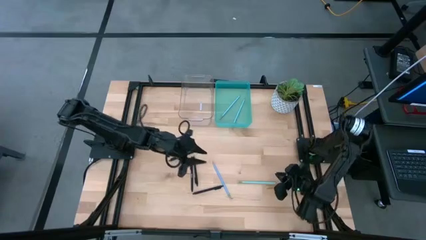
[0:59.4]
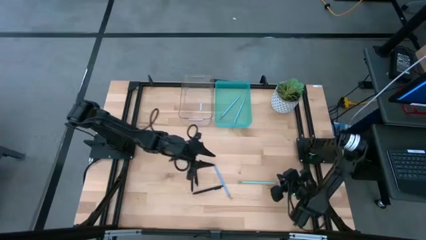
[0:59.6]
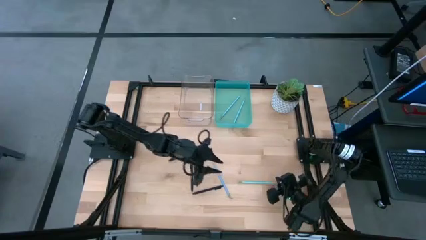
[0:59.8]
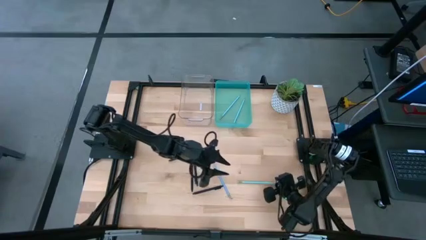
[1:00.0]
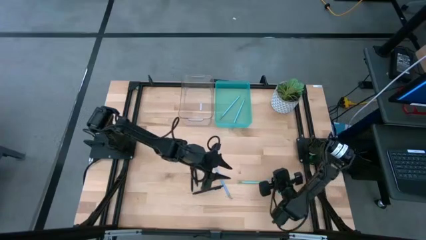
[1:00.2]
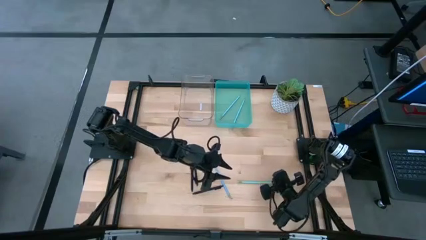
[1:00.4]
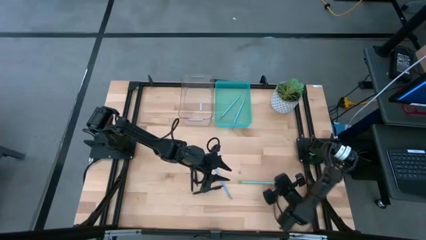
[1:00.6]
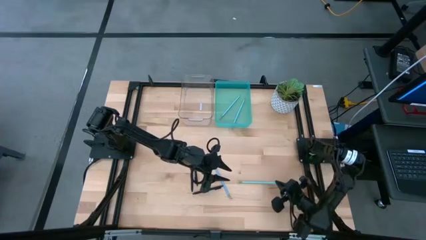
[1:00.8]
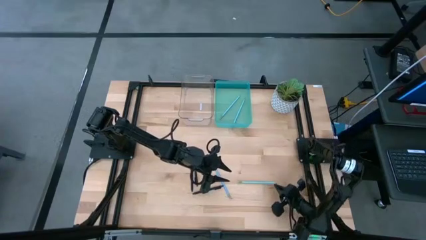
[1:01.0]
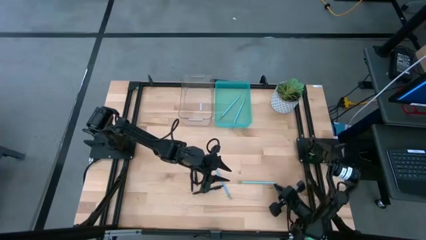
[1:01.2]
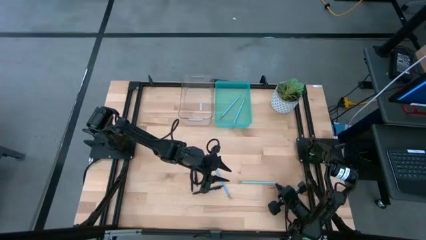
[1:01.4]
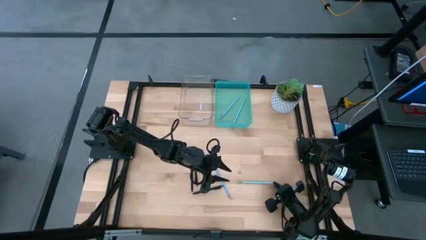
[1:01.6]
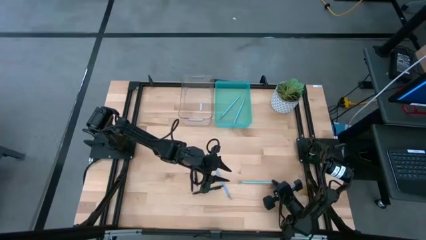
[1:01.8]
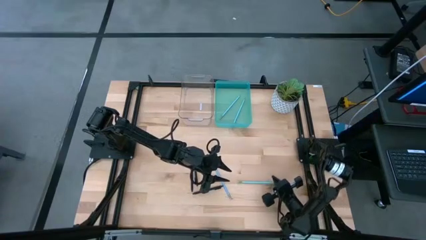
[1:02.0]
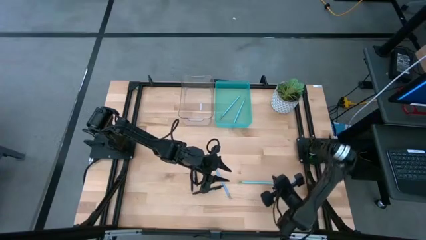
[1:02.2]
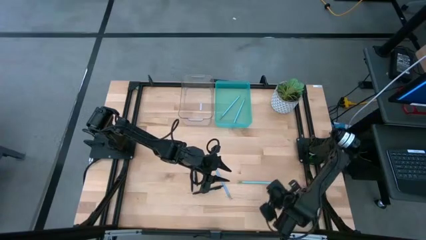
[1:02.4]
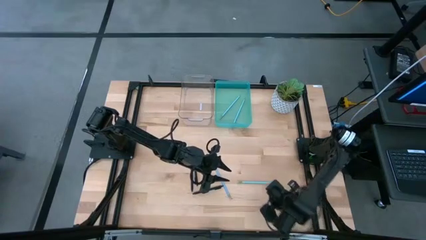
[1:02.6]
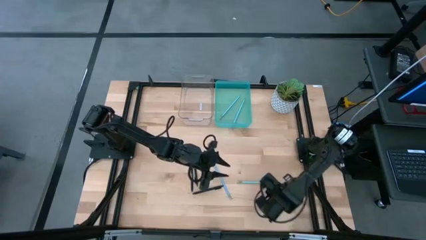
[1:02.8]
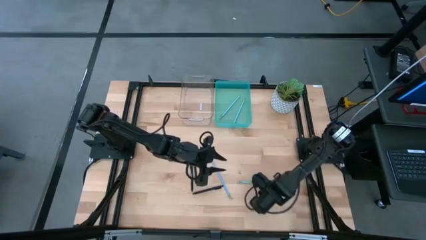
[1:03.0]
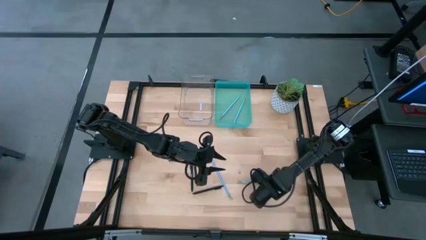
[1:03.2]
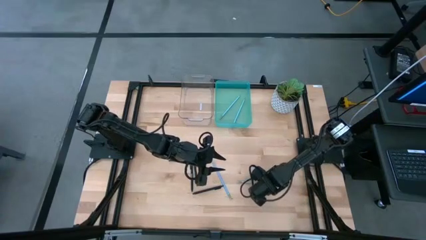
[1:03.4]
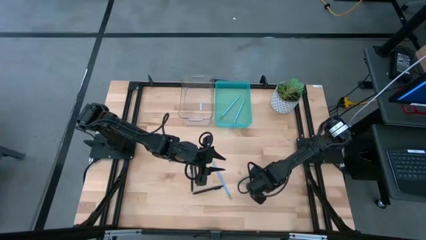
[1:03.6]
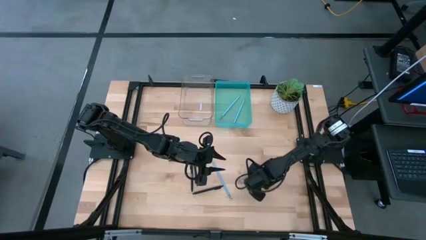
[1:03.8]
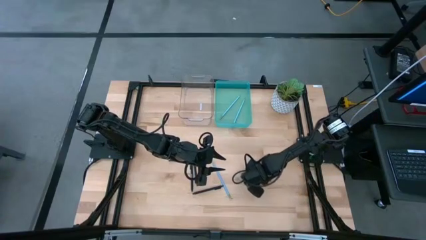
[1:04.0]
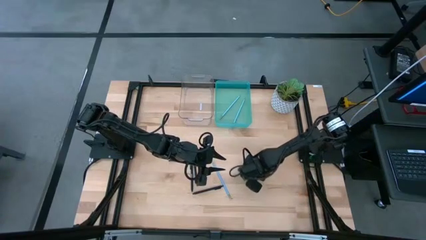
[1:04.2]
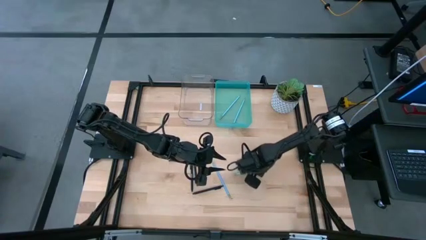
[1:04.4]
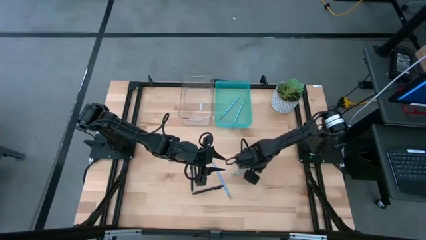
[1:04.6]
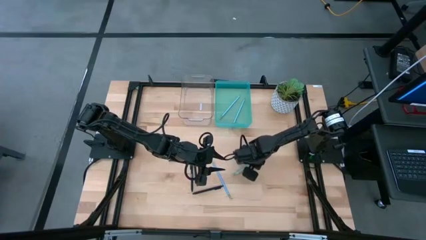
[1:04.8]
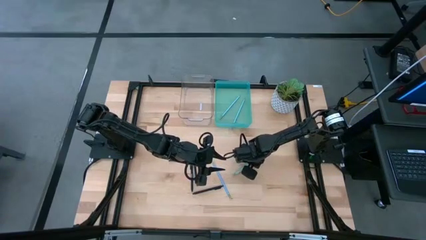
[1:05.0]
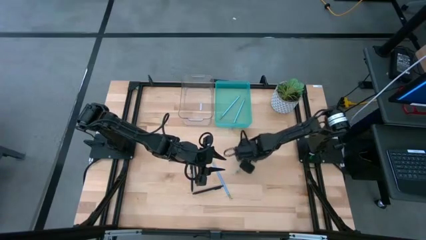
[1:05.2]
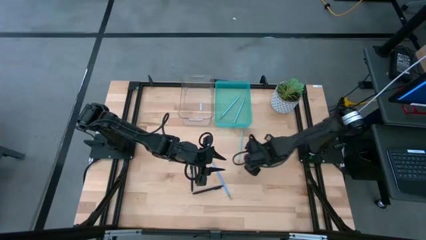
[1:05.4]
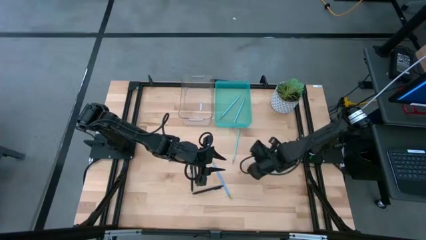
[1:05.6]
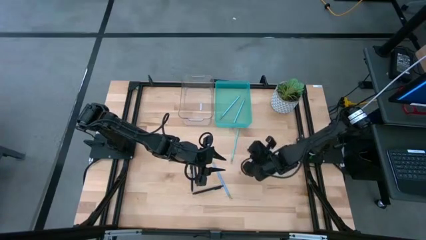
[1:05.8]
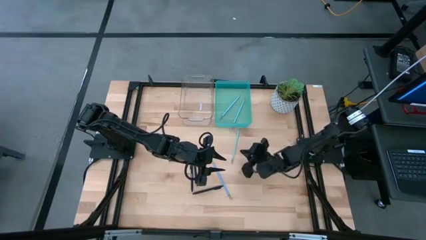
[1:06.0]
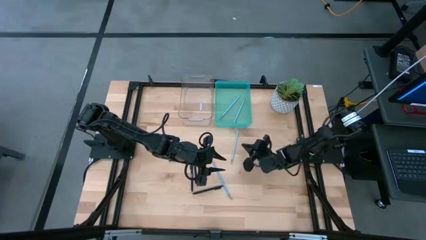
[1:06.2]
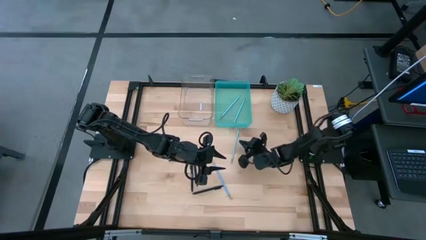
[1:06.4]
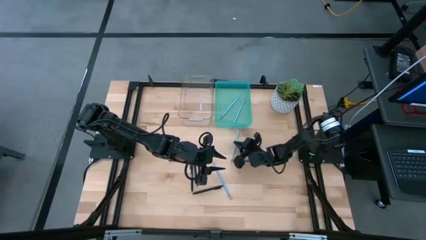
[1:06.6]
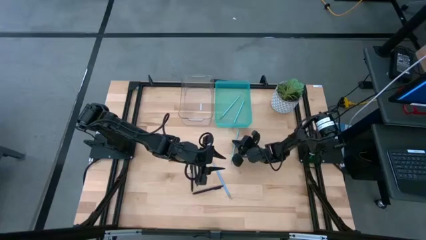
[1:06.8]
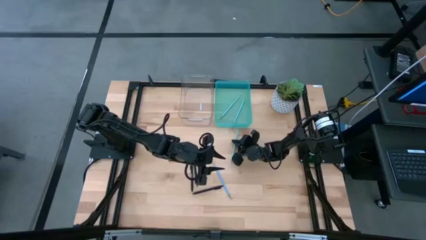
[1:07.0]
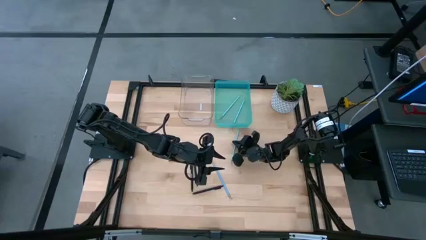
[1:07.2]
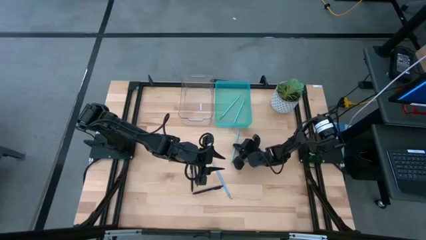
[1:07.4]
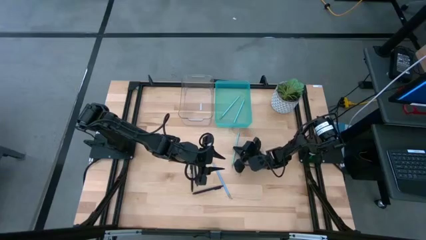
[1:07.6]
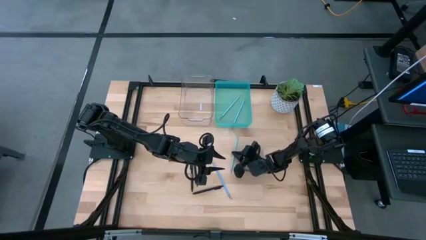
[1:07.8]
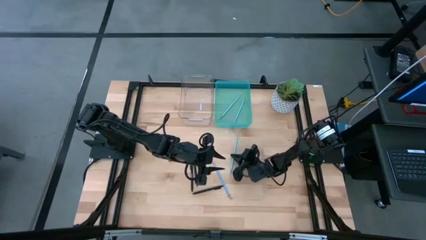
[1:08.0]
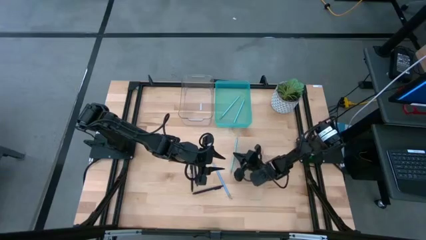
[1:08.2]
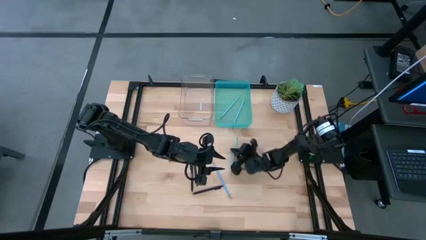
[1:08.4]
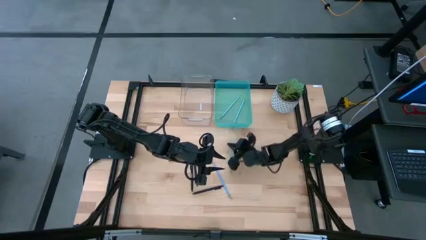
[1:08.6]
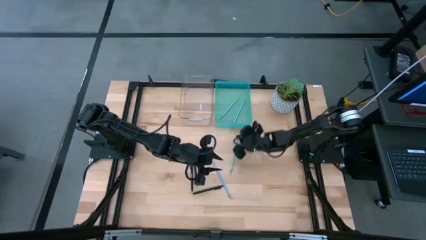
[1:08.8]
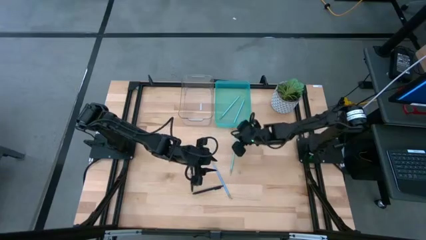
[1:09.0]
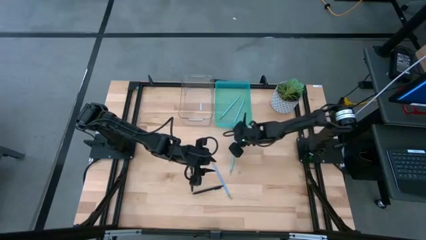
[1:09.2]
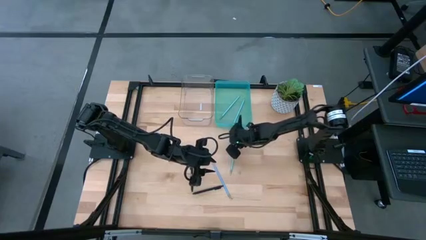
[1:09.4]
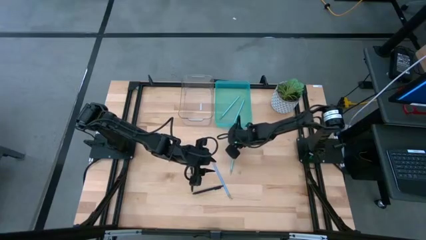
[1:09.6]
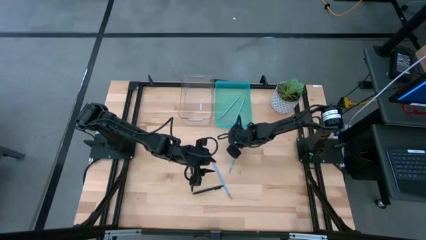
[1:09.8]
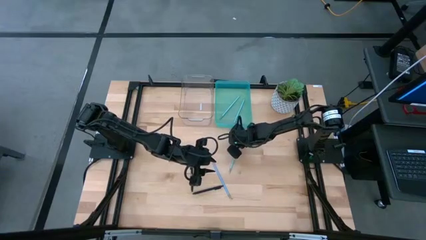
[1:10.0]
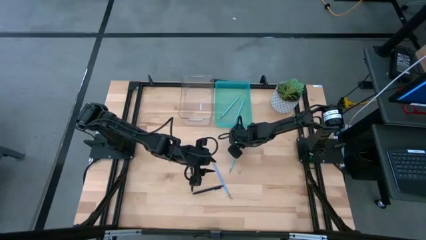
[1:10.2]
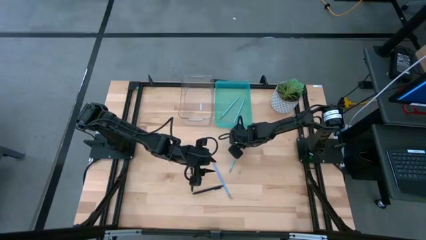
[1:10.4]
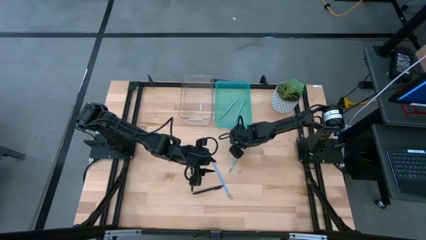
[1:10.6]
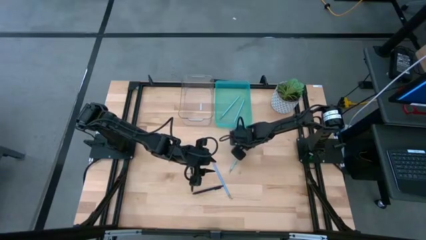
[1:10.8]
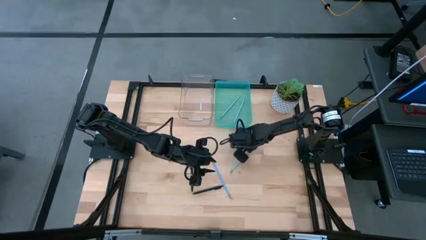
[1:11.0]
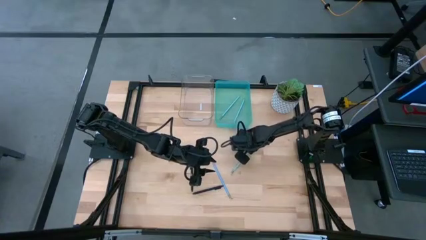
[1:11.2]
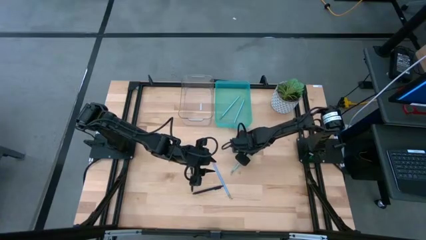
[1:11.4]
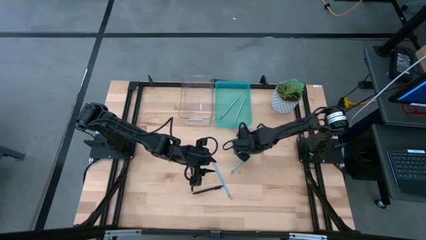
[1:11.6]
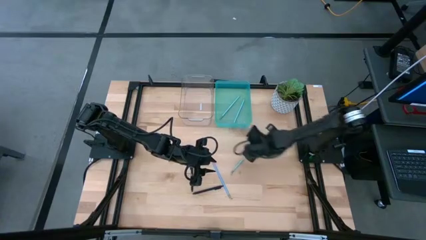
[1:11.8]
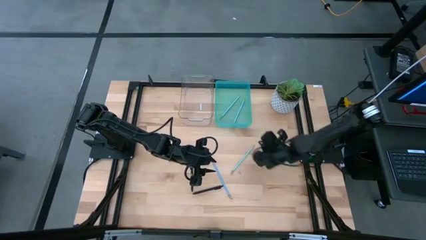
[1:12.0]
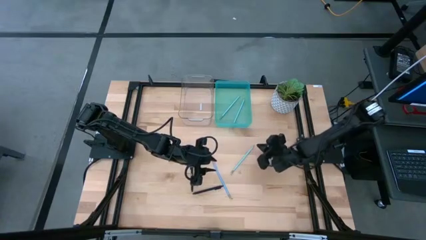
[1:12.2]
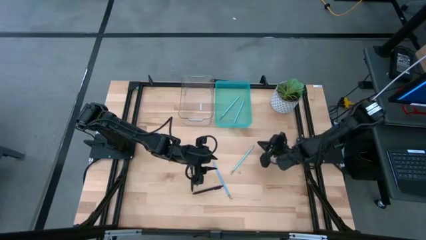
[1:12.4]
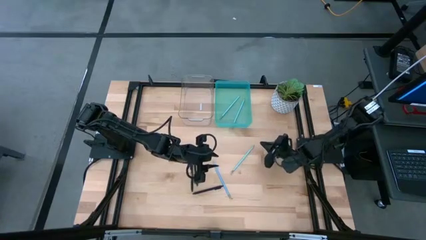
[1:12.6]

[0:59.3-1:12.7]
Task: Sort pens & pencils
Put the light blue pencil into the light blue bin
